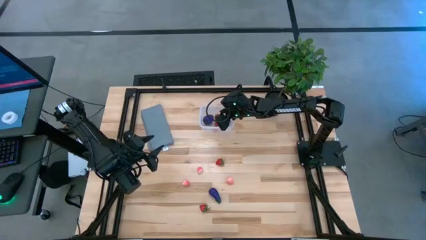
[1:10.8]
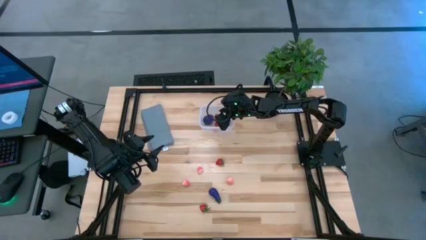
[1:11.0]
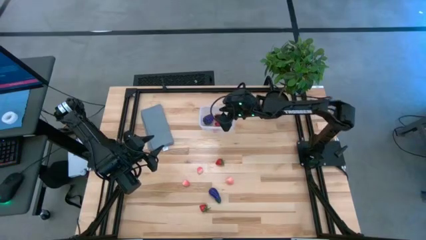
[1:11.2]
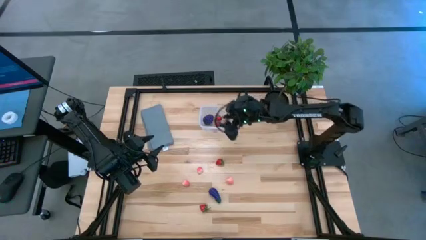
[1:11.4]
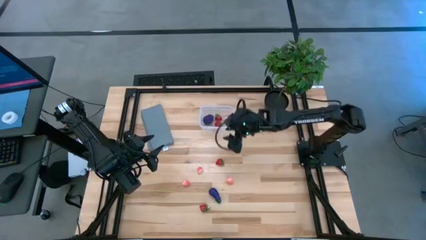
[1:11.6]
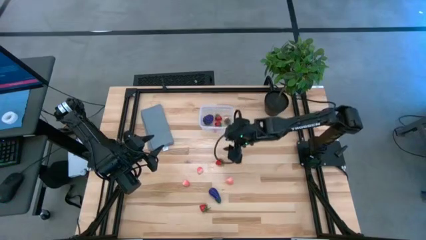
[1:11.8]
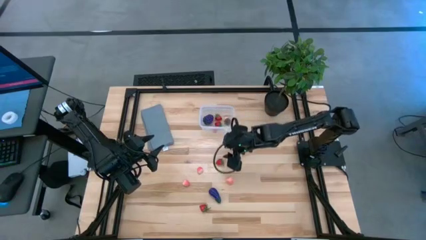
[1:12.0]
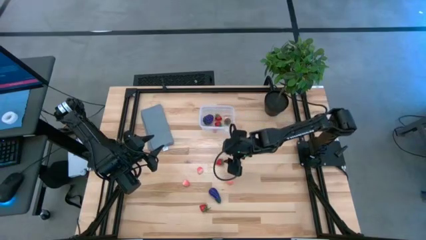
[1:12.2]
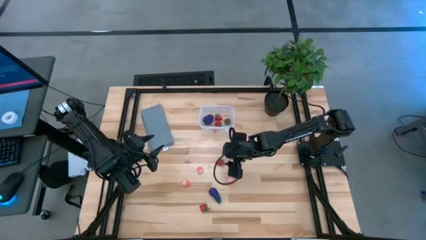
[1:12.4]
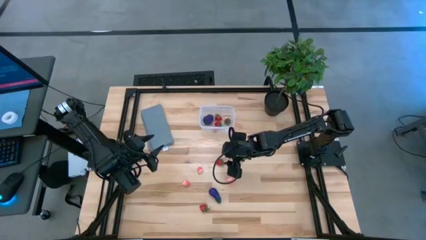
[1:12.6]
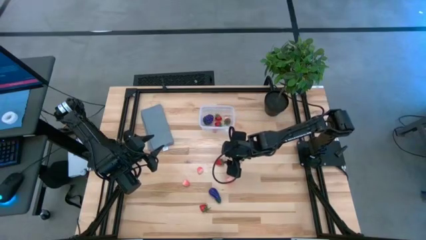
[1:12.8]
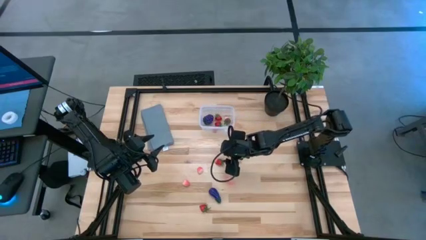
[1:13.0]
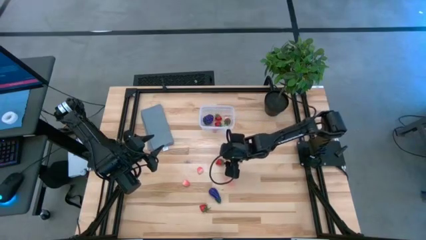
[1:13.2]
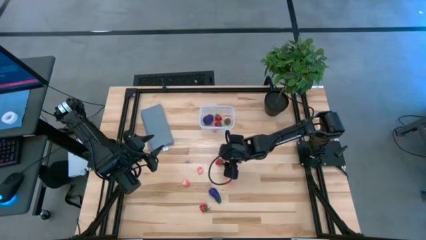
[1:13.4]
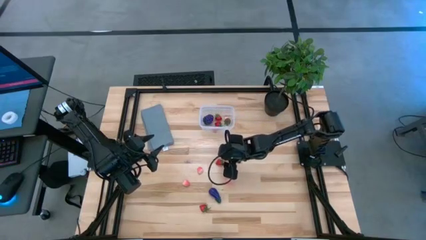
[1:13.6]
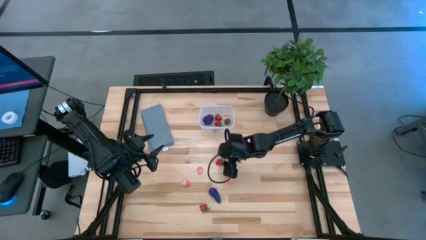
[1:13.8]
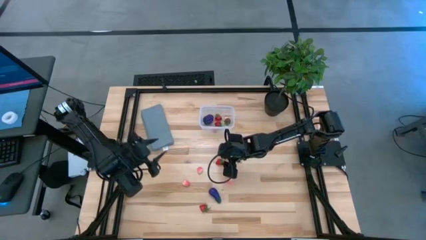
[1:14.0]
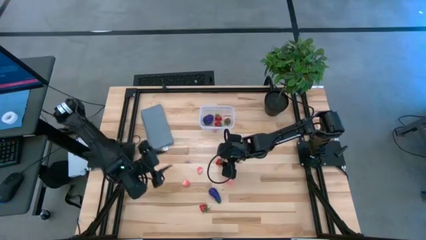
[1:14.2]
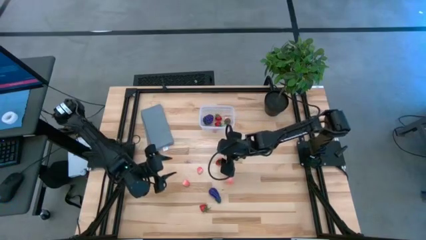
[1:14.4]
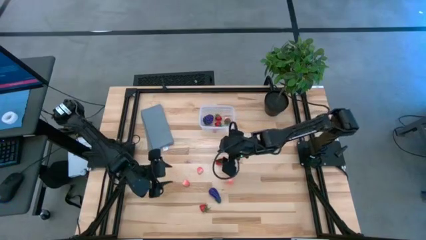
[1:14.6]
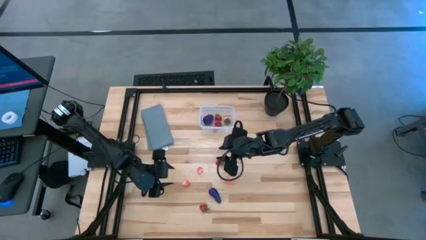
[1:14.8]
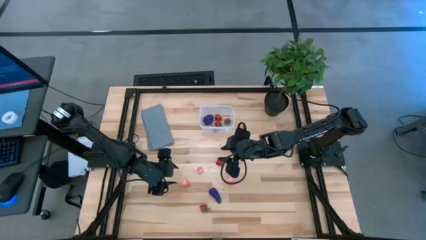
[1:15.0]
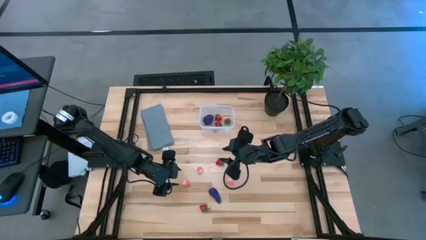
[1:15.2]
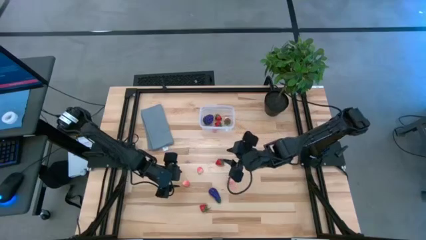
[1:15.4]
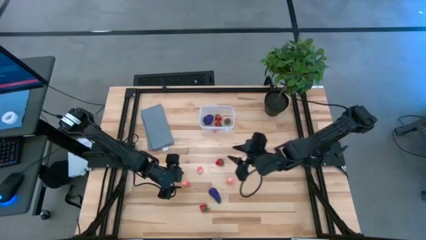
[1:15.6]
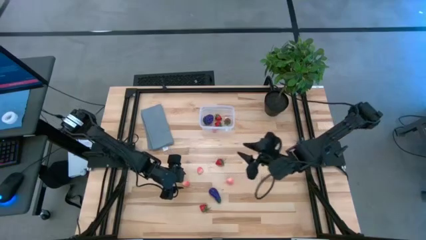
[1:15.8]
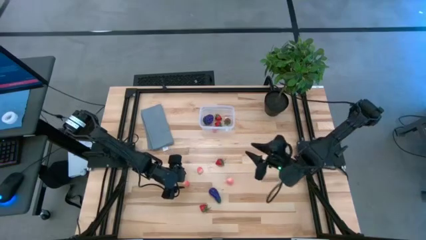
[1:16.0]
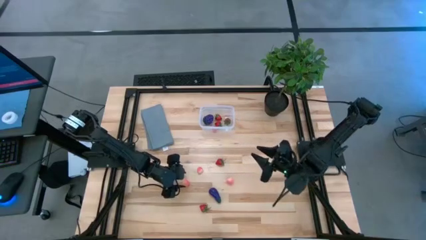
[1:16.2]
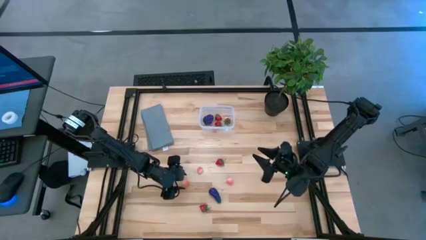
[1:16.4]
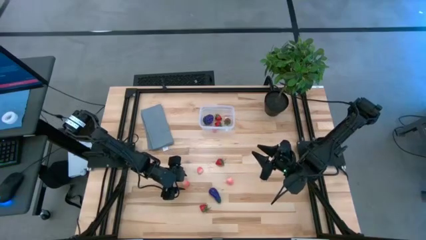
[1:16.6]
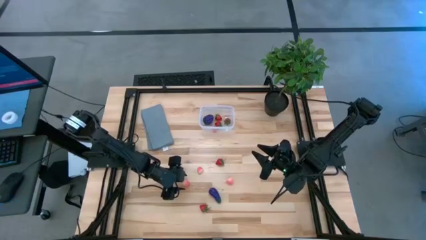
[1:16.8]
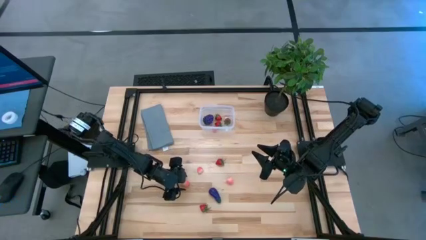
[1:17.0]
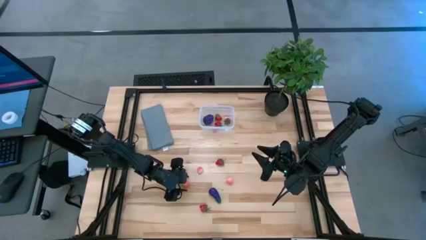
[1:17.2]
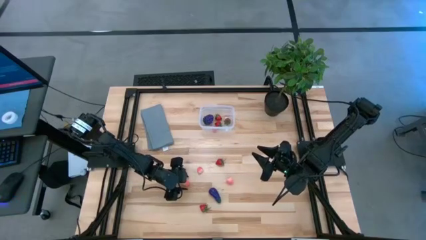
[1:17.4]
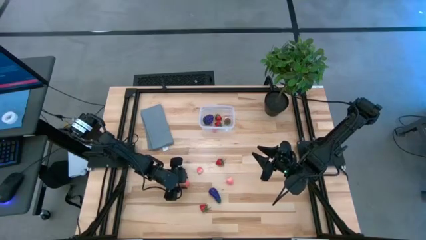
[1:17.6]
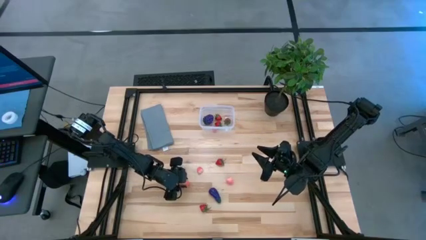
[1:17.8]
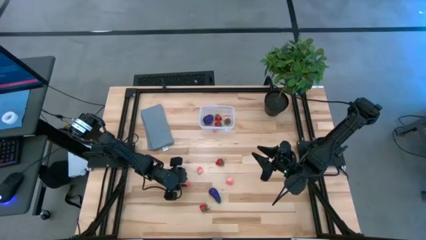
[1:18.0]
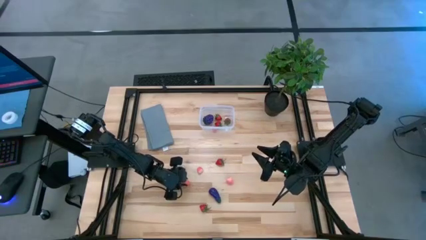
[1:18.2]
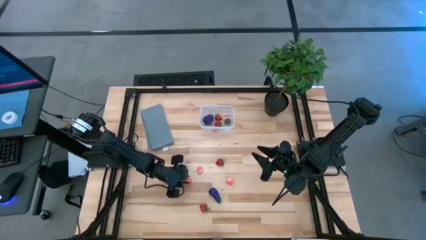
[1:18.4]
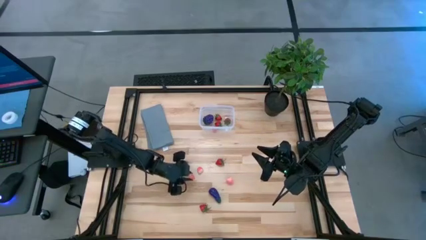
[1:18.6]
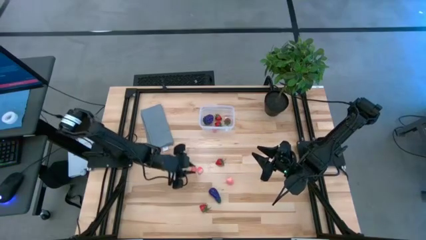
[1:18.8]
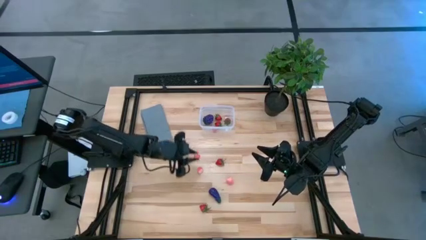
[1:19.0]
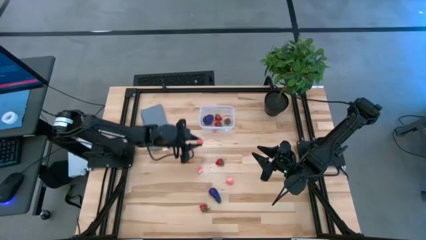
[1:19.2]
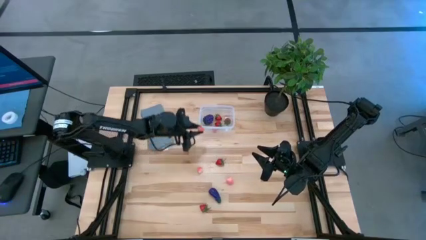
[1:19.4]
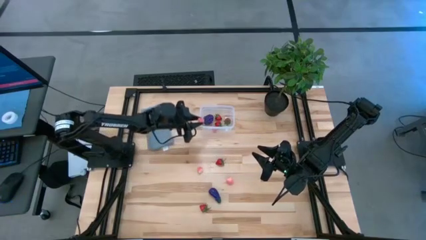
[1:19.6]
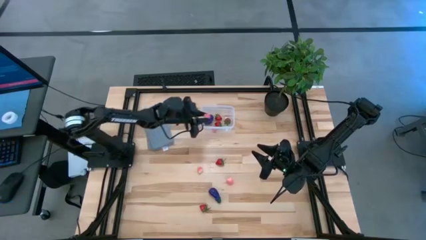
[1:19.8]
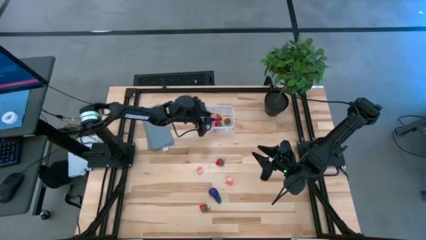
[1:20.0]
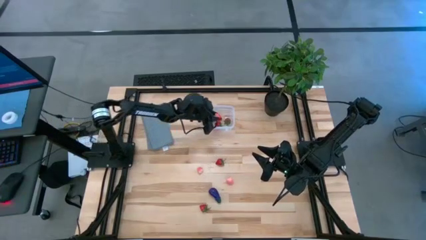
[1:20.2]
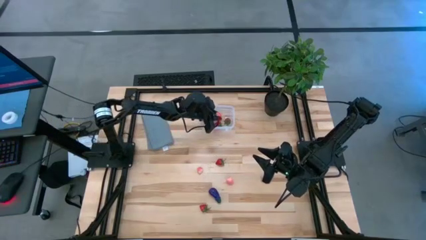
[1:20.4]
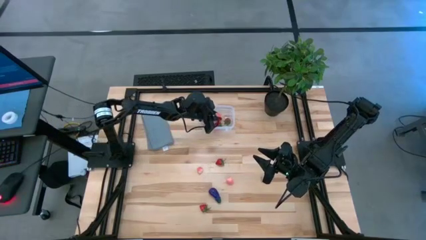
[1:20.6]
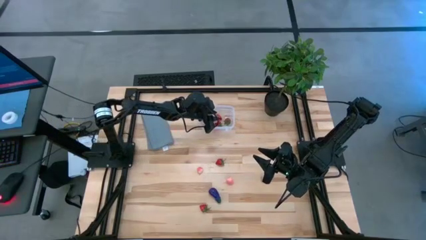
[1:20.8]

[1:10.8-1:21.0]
Task: Pick and placing Produce into tupperware
Put the peach into the transparent bin

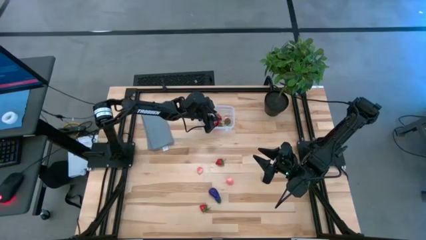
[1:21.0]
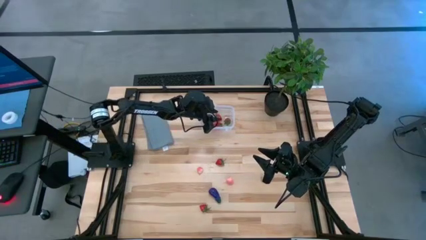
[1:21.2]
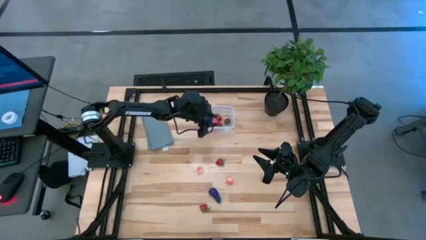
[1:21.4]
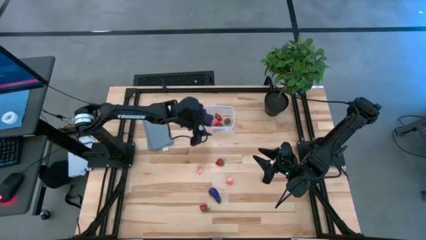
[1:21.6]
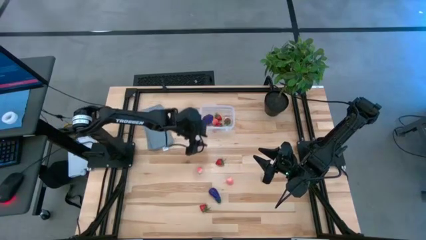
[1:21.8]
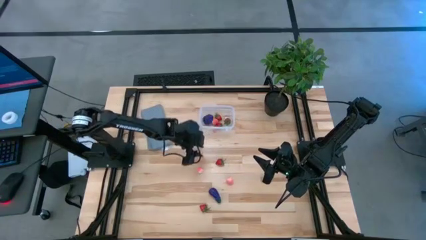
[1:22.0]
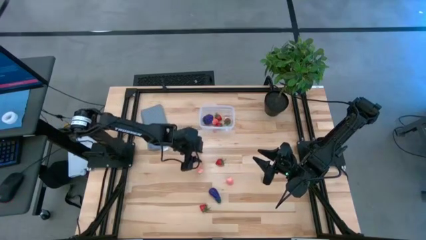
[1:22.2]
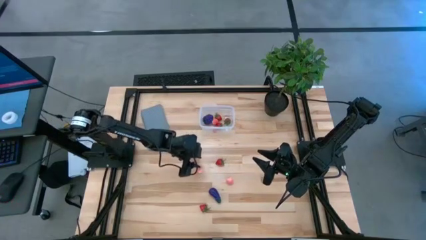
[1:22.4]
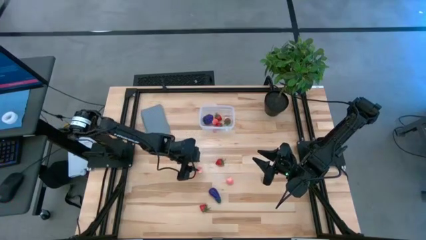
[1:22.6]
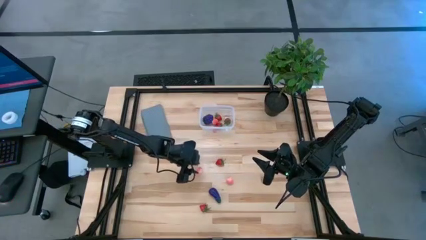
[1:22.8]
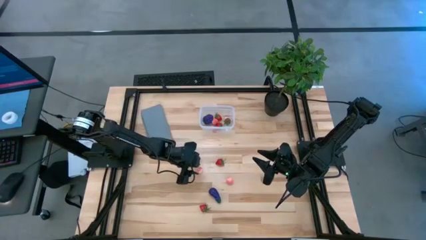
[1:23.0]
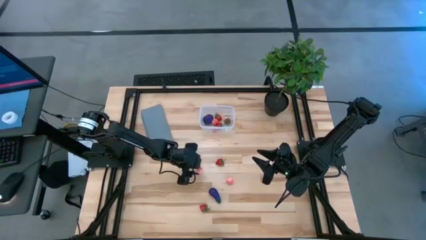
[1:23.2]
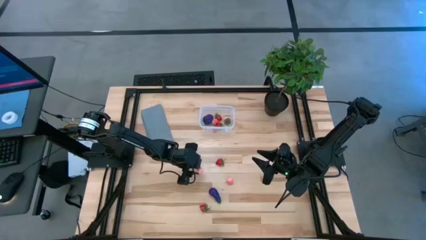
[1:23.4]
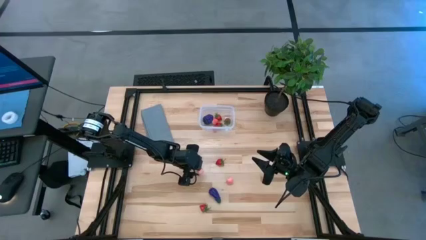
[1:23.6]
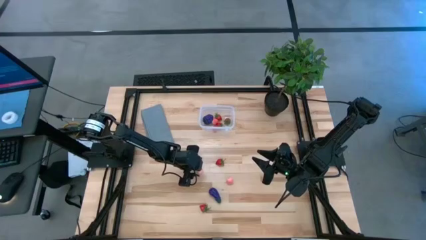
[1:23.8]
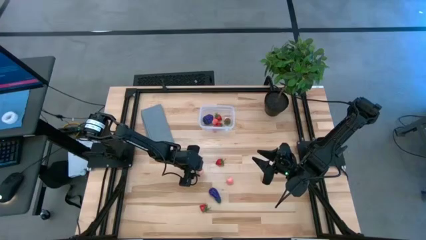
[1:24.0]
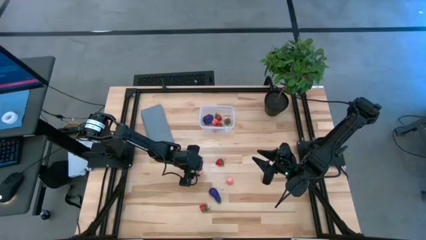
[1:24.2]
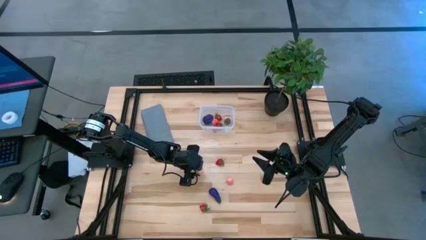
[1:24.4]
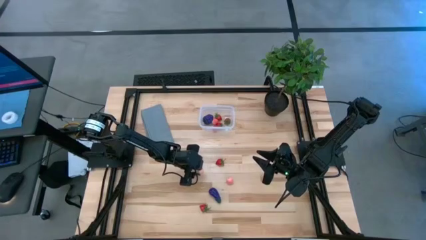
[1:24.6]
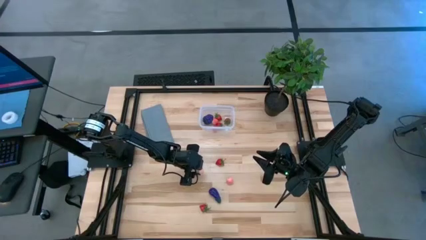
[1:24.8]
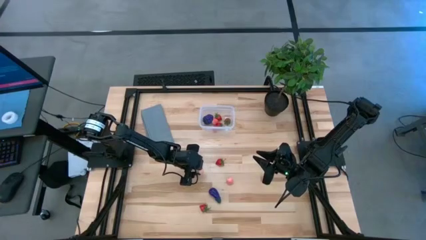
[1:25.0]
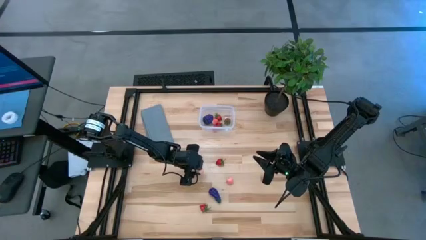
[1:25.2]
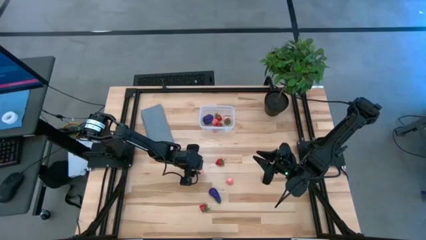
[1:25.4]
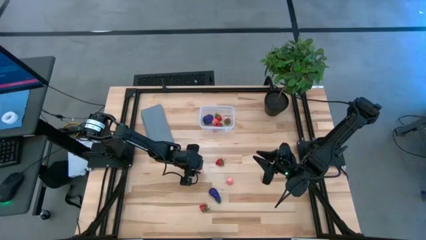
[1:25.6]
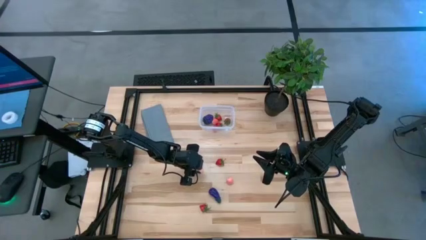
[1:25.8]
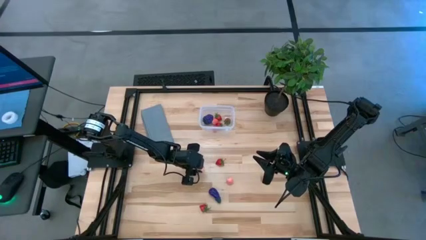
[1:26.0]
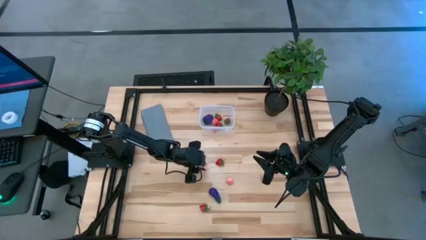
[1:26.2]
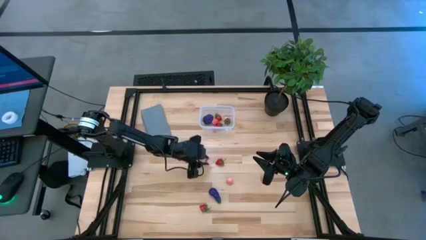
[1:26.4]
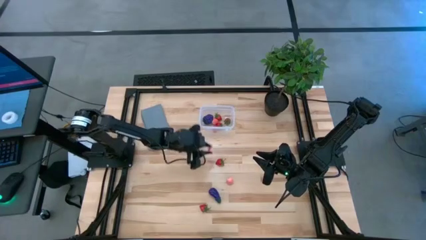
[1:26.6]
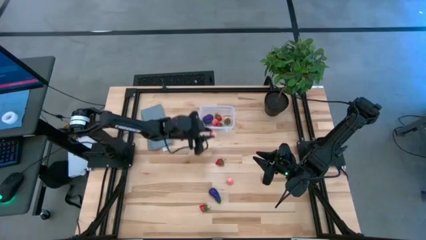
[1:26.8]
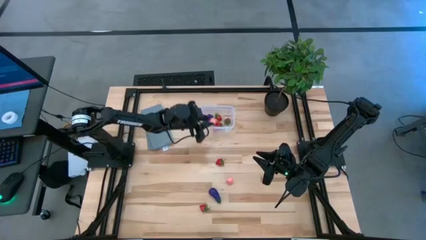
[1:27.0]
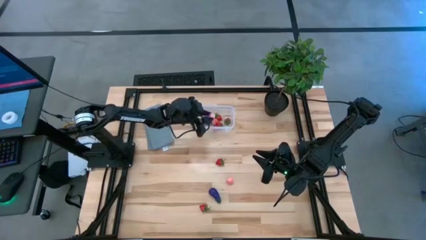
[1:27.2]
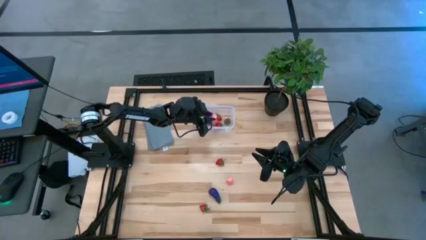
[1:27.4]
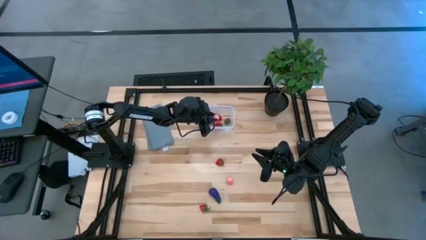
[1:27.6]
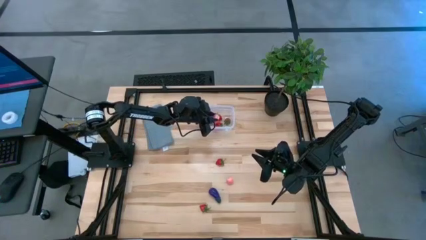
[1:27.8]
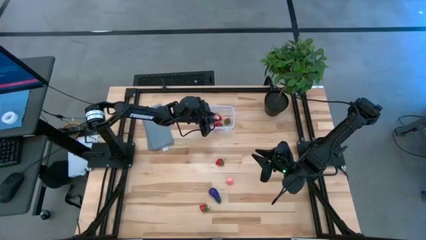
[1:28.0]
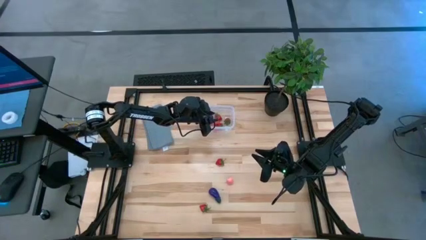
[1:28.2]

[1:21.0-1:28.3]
Put the peach into the transparent bin
